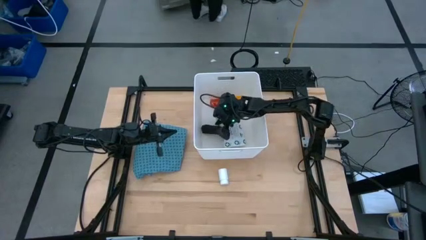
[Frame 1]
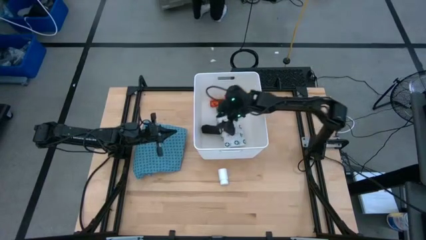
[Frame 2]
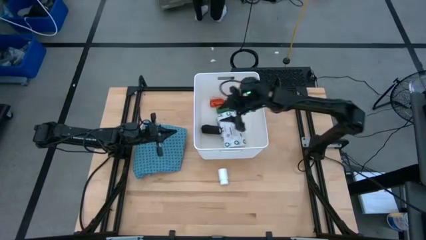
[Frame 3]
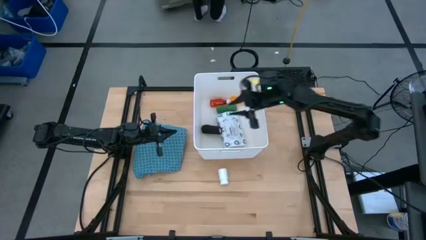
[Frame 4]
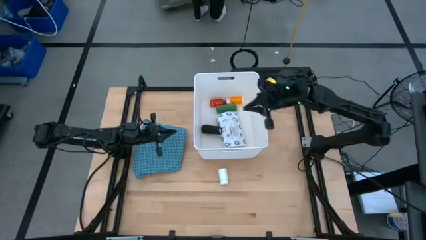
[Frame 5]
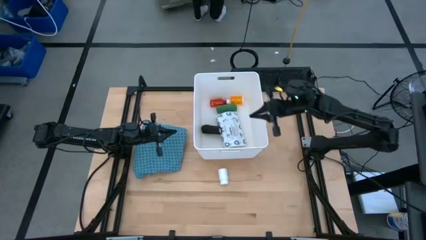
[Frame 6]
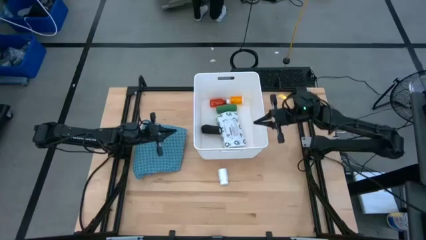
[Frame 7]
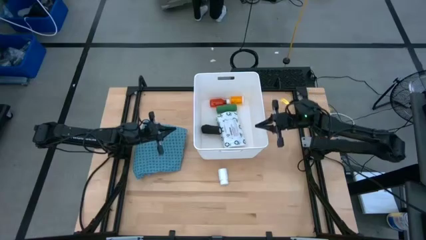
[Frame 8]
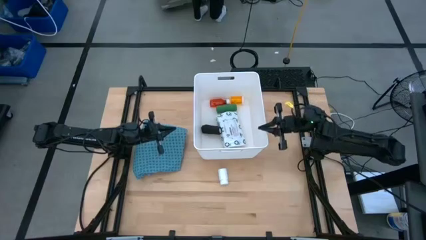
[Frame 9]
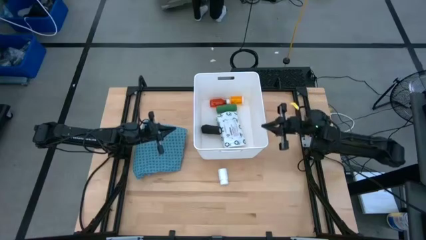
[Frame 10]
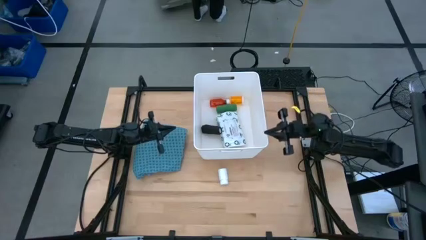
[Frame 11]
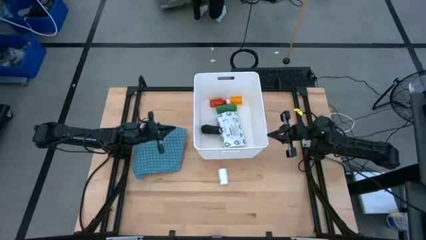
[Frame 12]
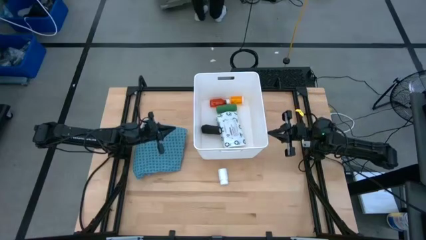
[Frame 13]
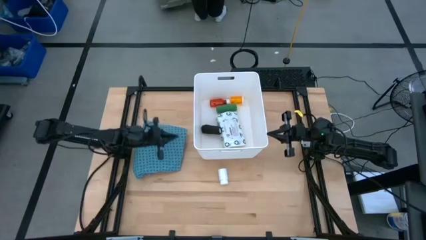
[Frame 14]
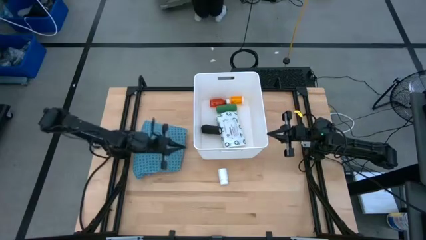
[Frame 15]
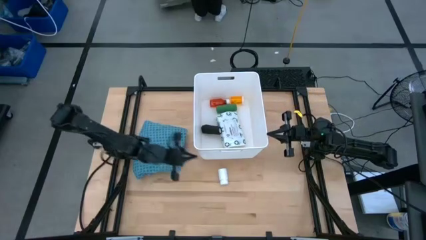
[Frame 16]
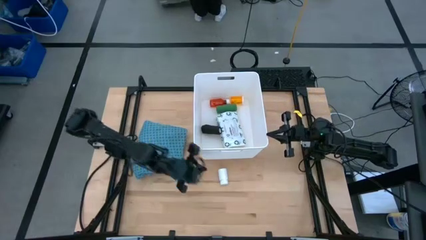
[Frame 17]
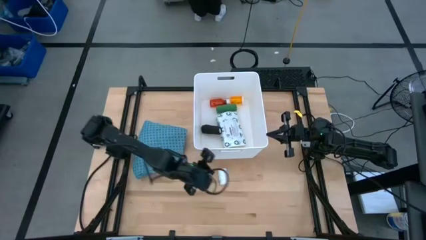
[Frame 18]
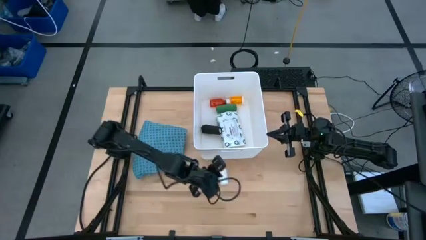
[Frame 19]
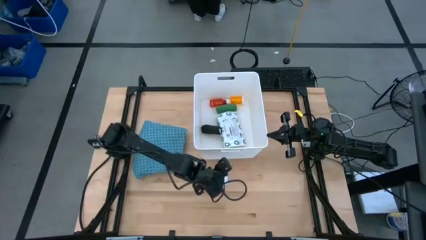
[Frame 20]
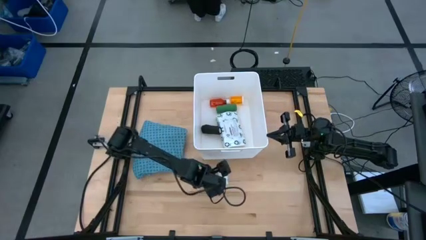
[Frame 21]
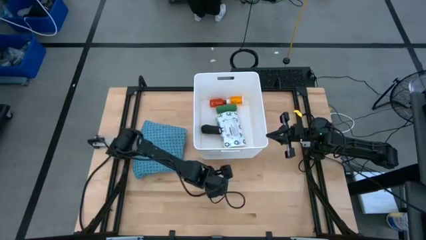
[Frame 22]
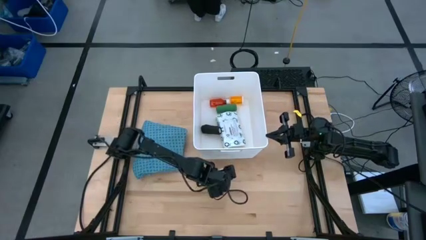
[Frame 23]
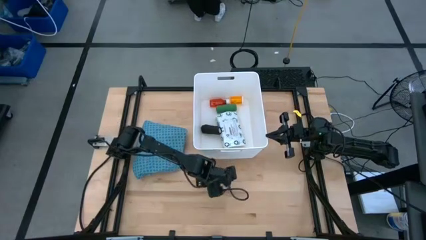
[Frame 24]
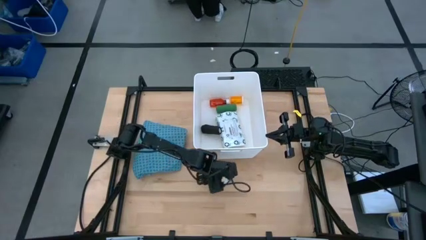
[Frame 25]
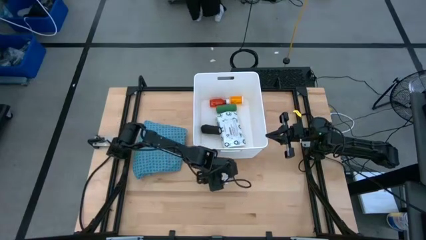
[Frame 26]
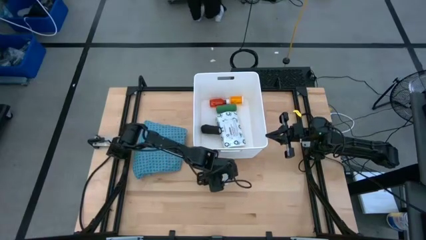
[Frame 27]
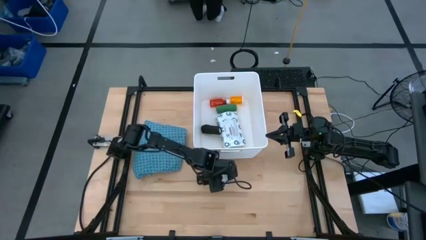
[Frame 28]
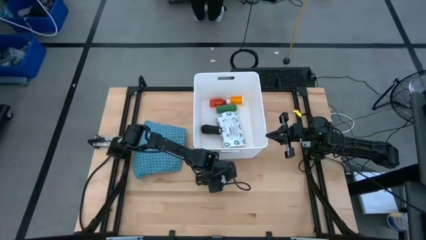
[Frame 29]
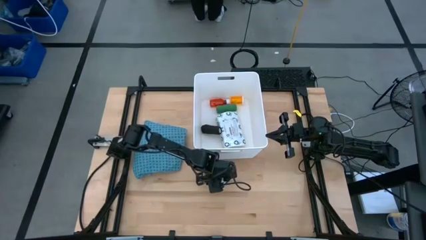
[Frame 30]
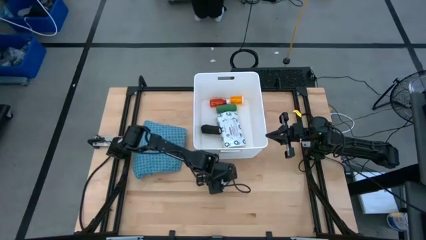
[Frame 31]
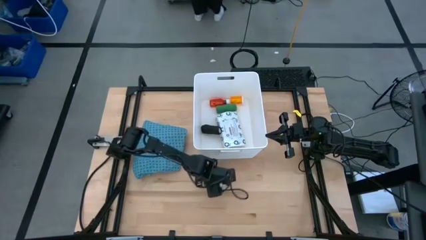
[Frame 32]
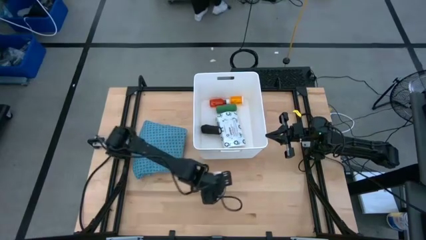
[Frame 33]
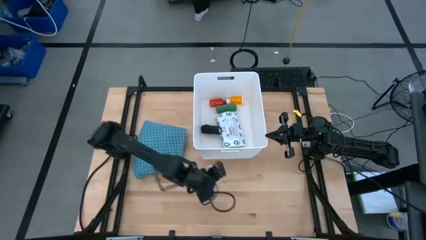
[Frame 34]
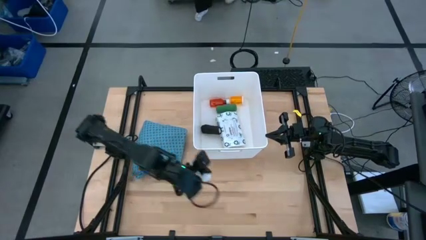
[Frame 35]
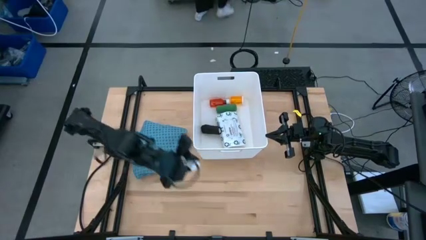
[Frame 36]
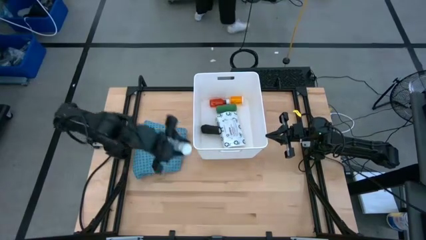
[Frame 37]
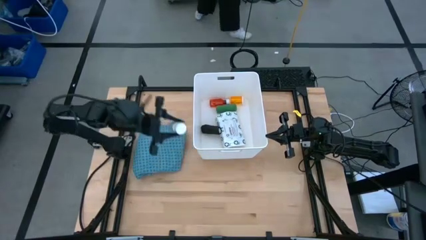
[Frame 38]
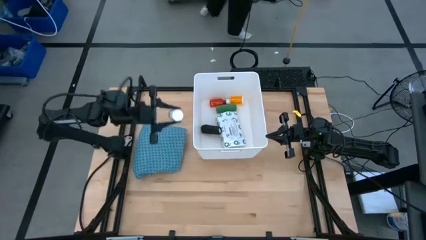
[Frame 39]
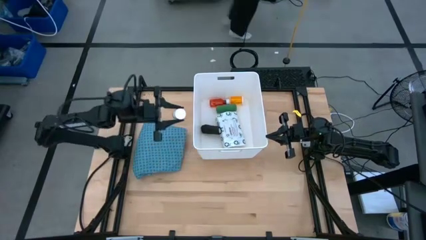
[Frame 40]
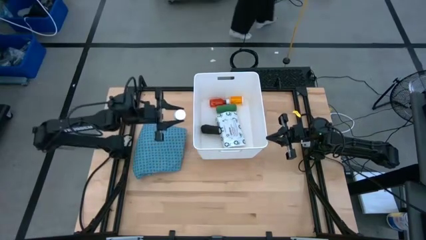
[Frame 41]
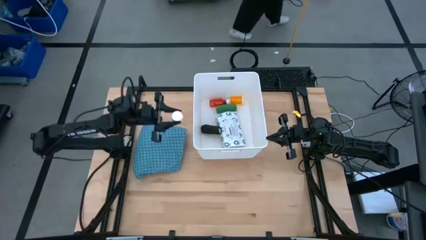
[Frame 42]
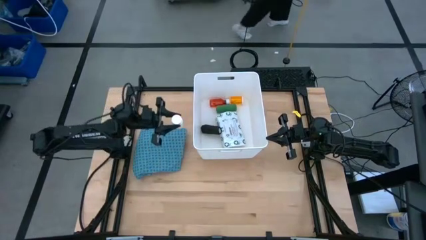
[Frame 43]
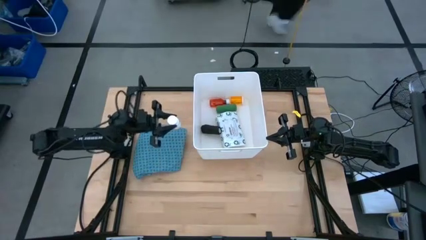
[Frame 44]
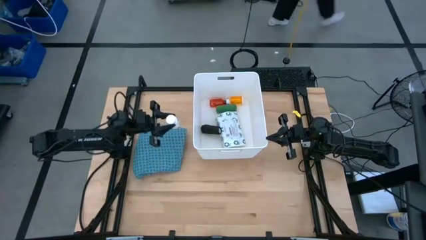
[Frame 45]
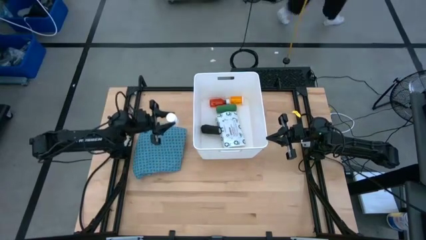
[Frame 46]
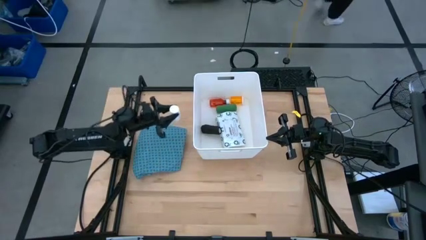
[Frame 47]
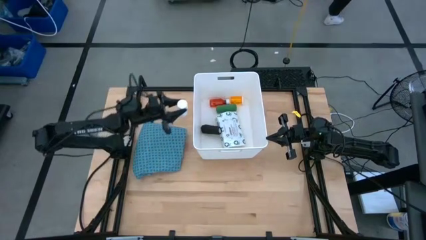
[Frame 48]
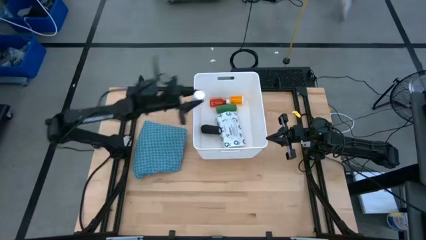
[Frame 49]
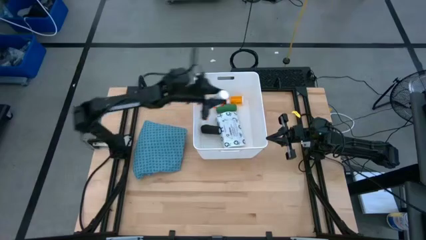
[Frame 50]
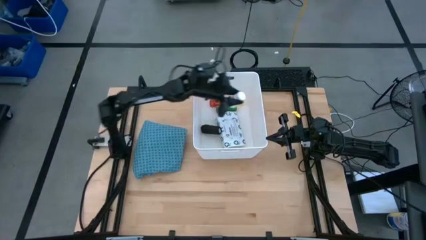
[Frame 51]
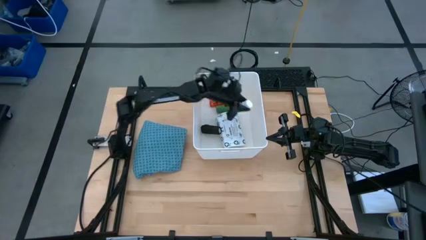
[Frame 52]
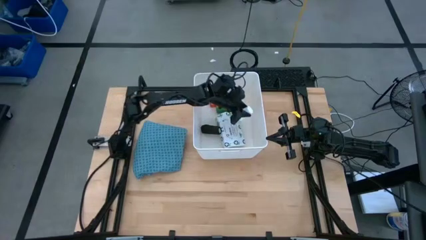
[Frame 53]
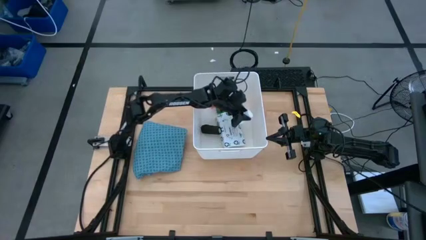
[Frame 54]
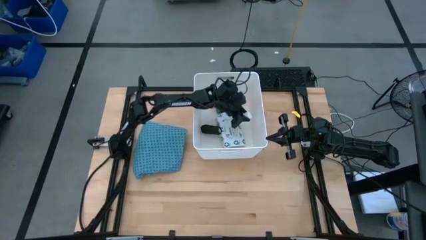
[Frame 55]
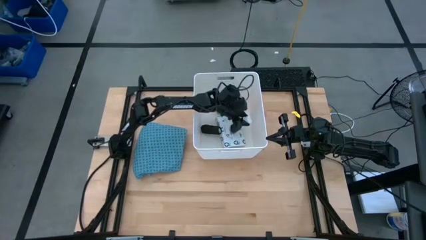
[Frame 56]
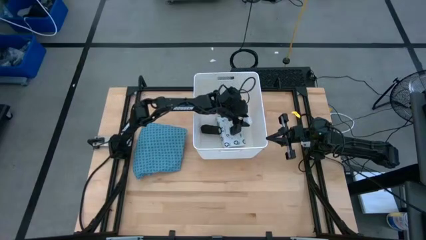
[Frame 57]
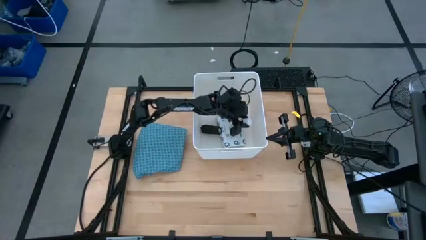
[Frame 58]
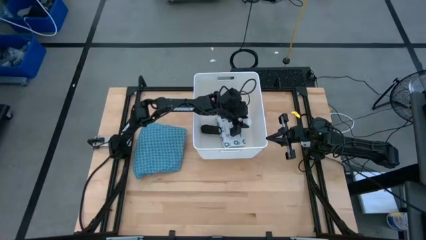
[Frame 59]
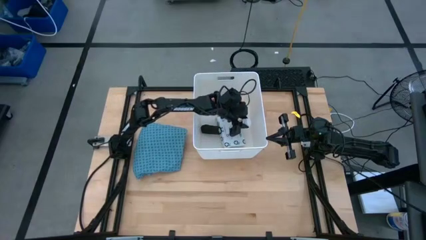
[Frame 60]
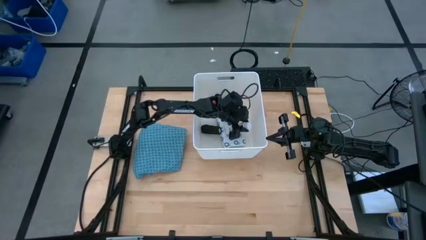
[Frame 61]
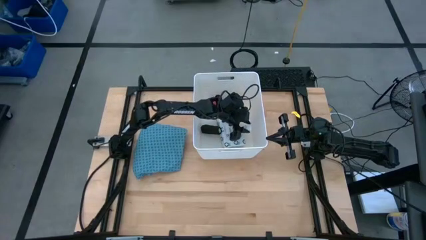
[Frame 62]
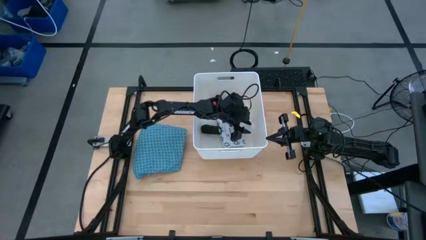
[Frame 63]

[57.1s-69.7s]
Task: Pick & place medical supplies in basket/bin
Put the white pill bottle into the white bin

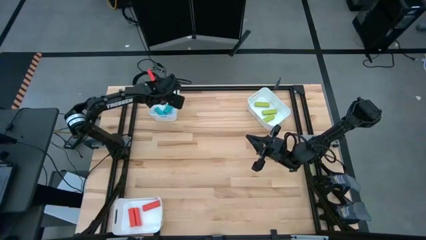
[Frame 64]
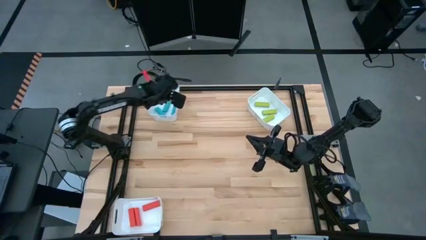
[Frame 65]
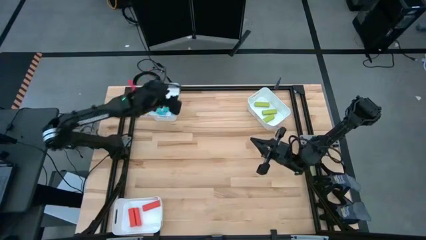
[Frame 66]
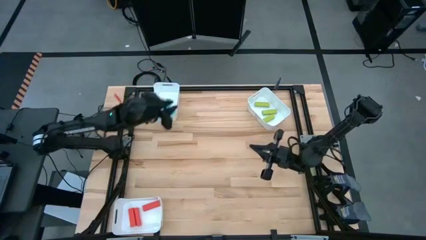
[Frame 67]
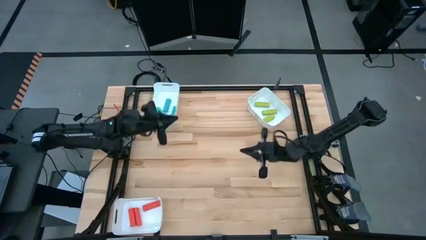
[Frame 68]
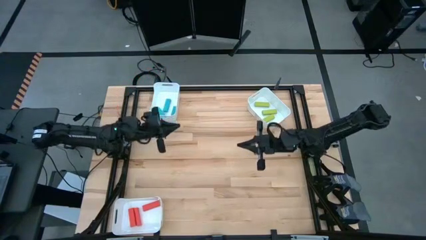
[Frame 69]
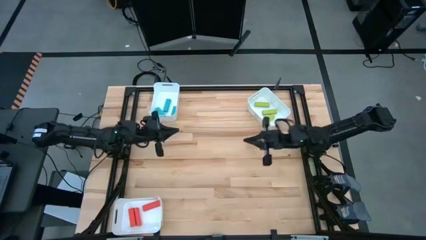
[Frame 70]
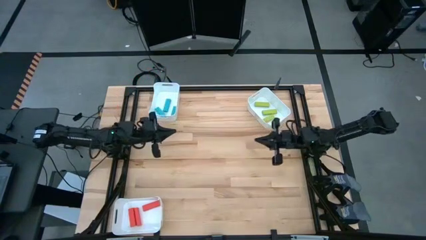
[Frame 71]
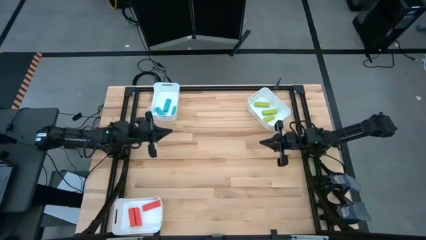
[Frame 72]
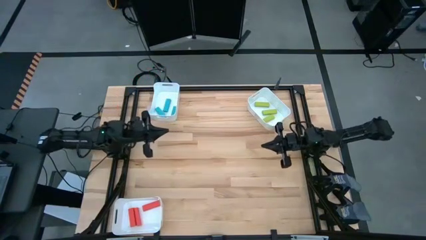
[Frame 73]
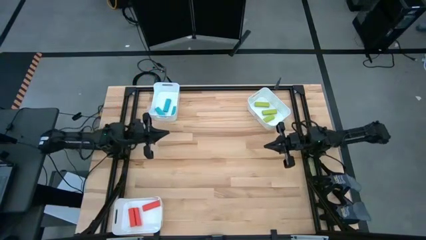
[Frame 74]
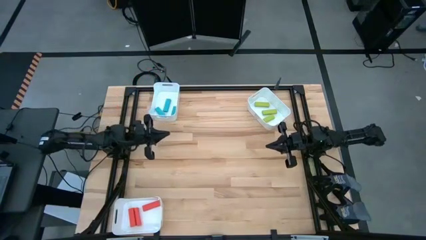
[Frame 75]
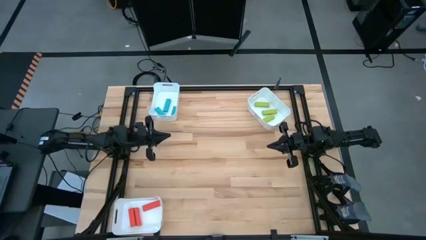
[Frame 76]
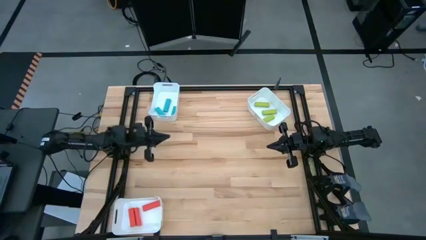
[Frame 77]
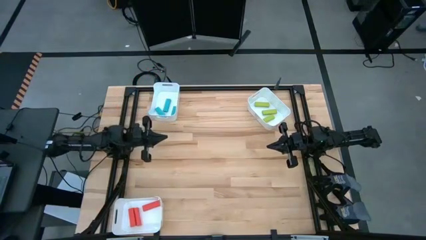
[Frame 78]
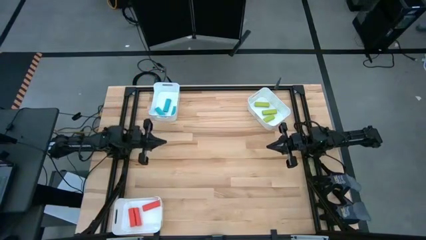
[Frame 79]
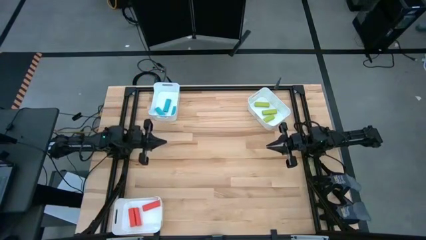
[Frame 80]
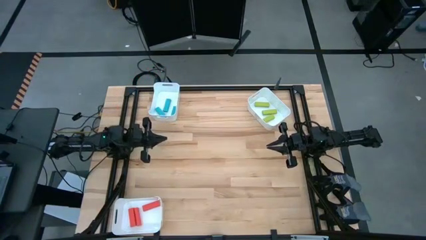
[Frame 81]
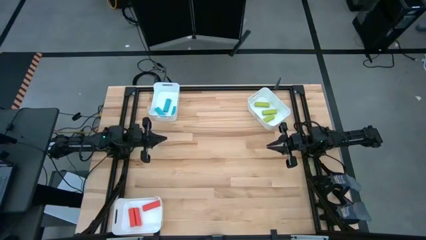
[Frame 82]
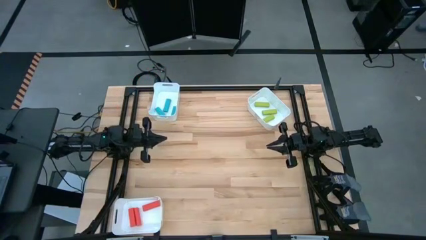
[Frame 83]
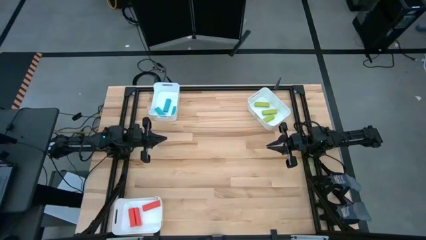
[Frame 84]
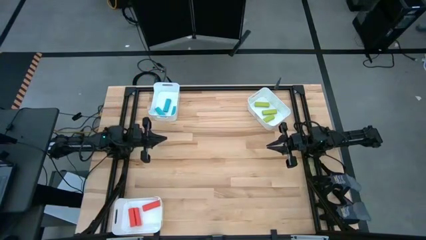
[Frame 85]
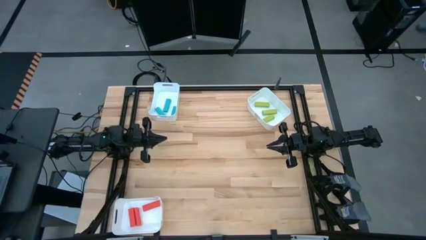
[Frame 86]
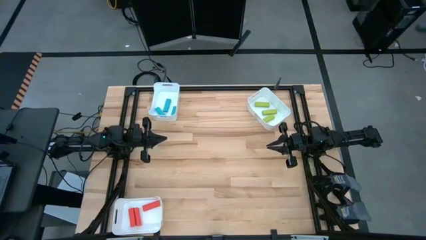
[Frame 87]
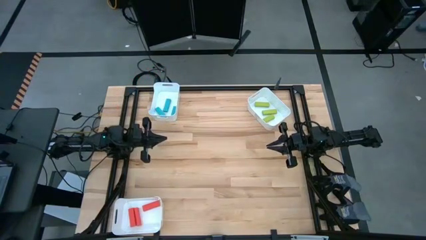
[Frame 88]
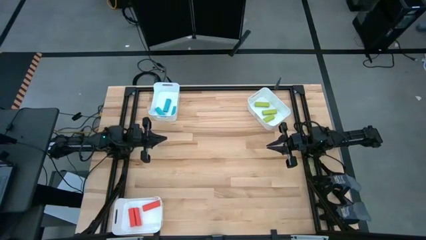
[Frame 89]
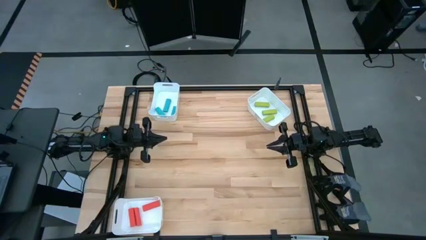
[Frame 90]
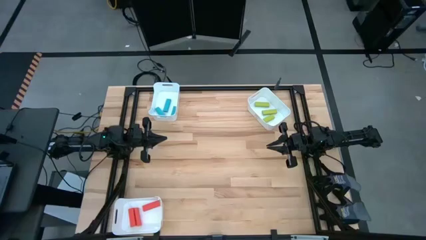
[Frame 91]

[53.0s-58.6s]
Task: Sort blocks
Return to Home Position
